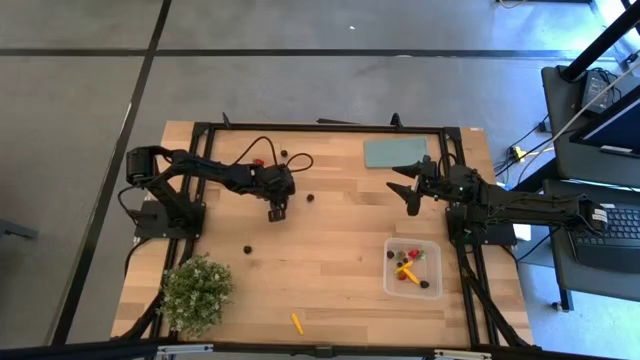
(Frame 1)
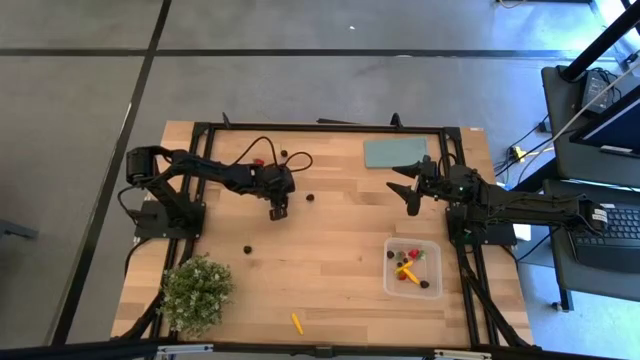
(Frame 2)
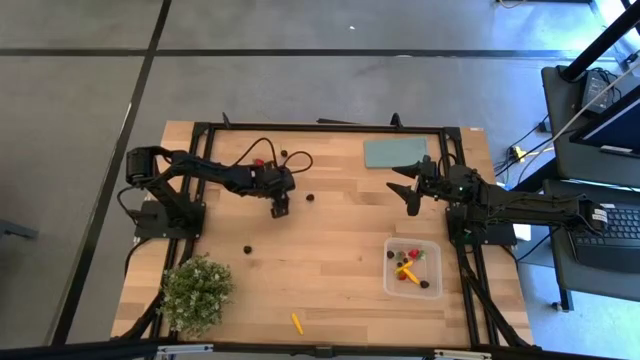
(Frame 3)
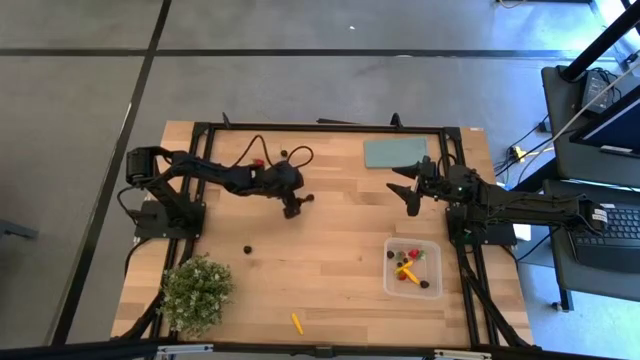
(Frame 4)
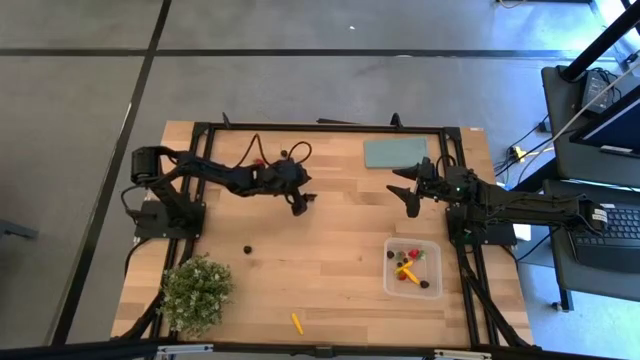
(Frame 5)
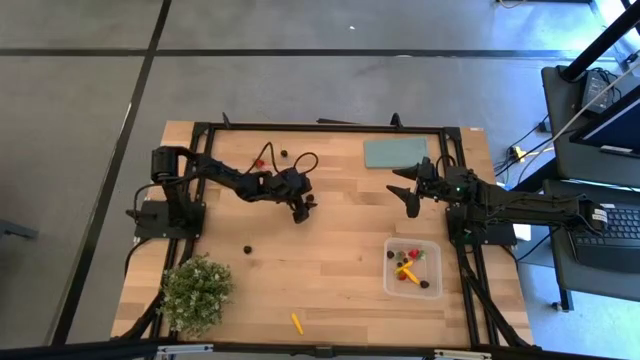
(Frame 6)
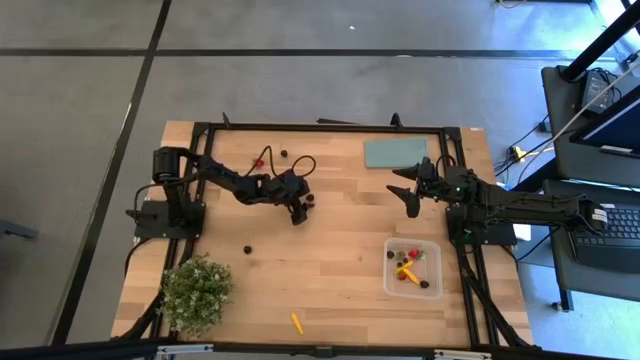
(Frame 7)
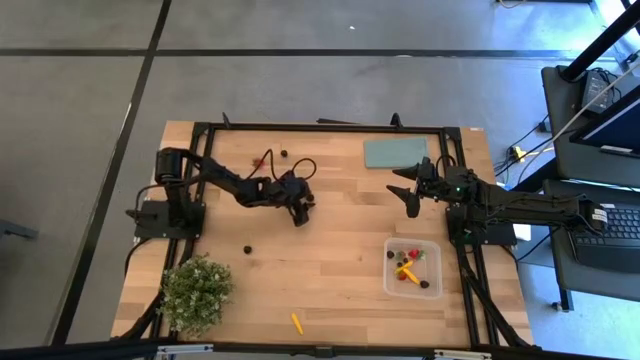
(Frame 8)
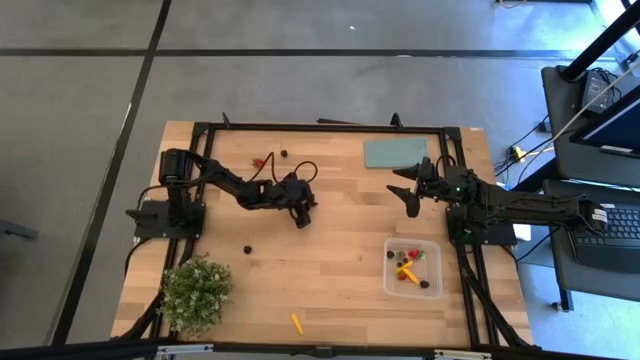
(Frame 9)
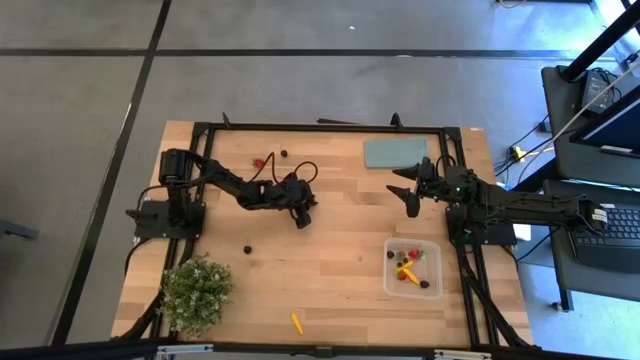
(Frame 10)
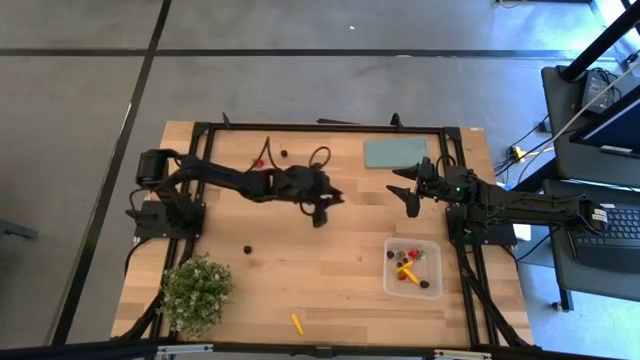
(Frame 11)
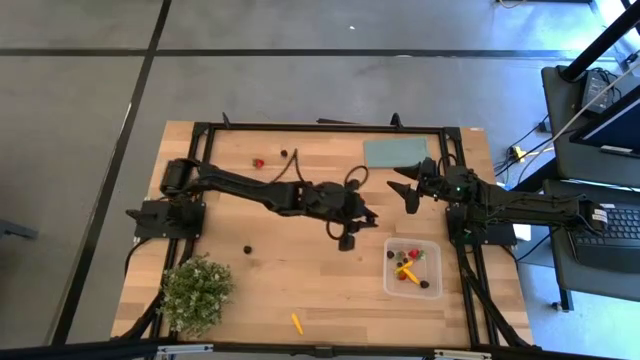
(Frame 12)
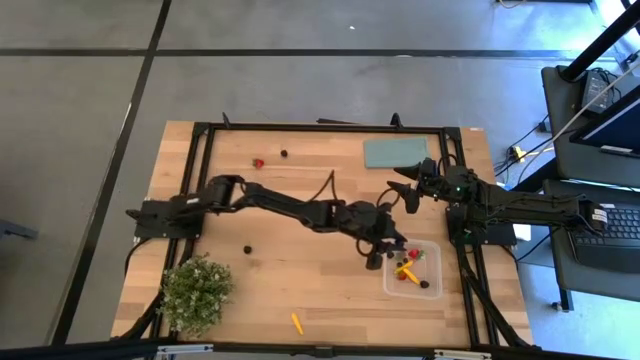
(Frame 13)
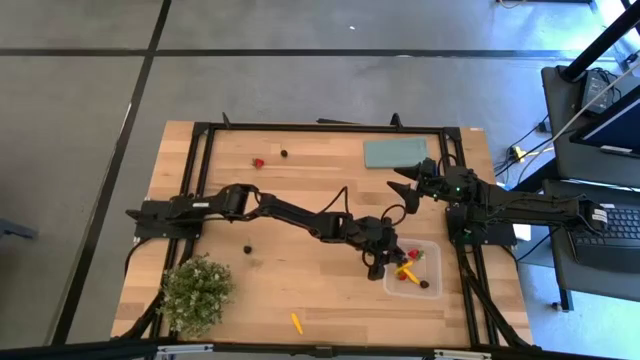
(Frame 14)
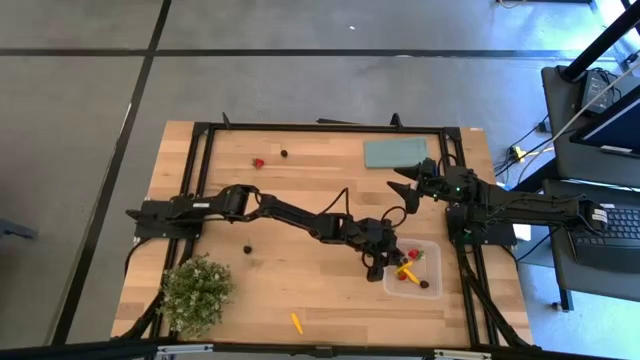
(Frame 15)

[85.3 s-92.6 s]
Task: Pick and placing Produce into tupperware
Put the blackberry into the container

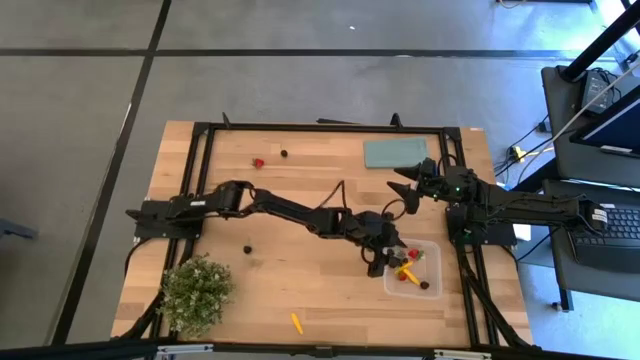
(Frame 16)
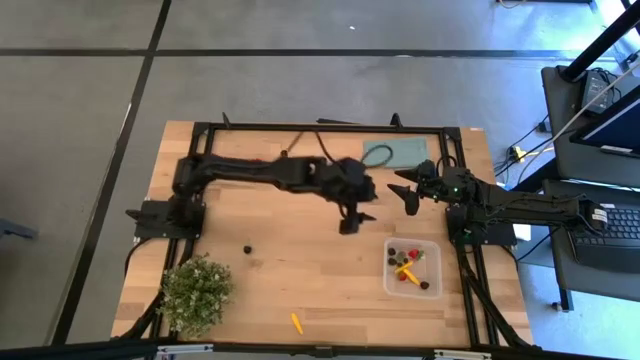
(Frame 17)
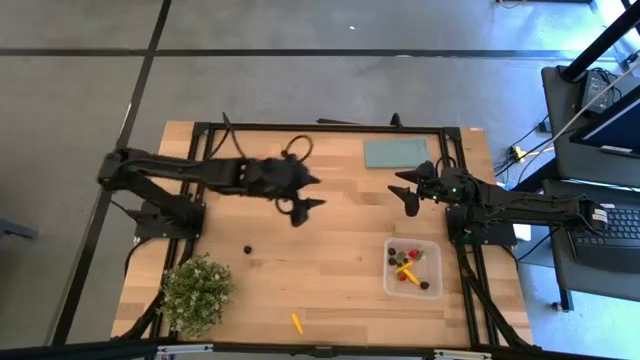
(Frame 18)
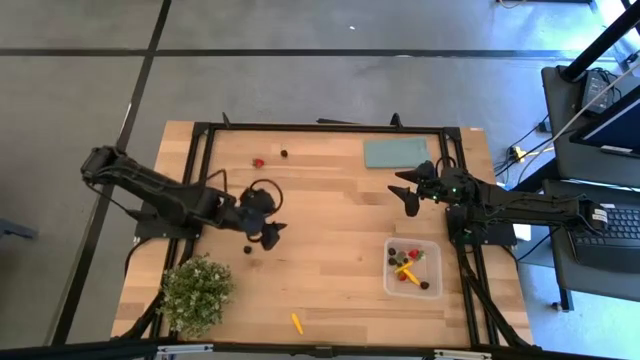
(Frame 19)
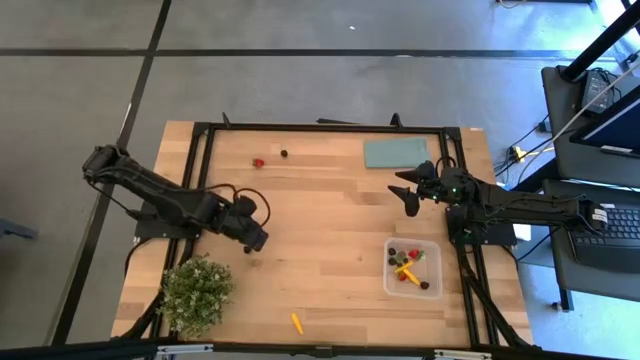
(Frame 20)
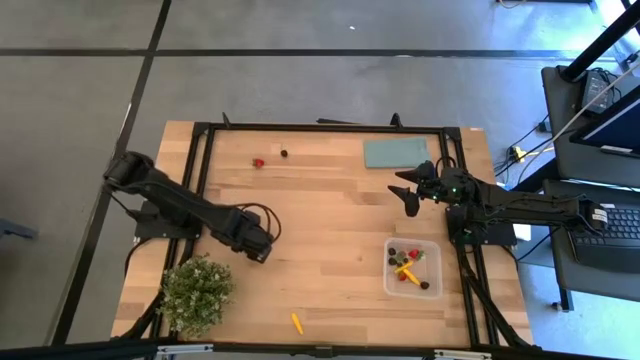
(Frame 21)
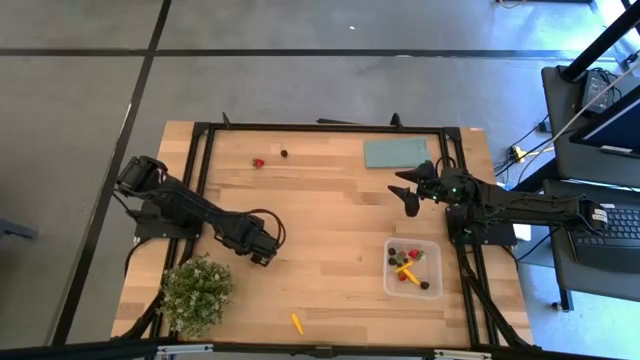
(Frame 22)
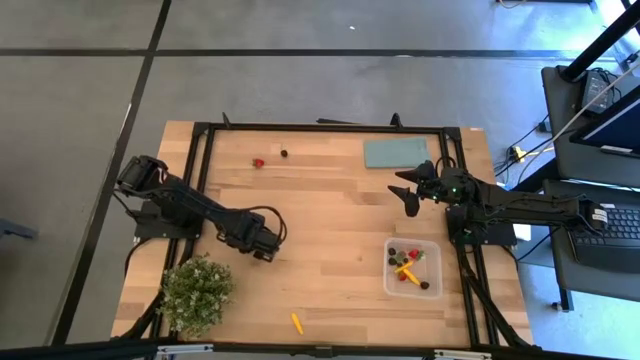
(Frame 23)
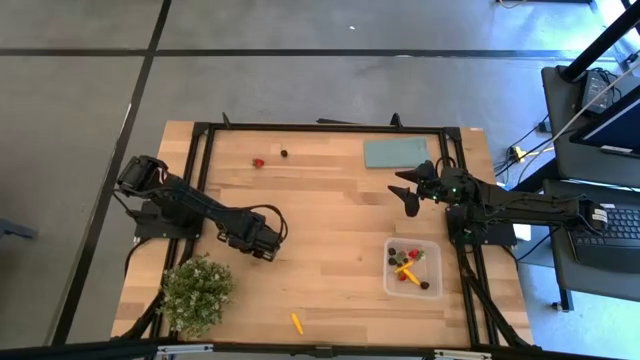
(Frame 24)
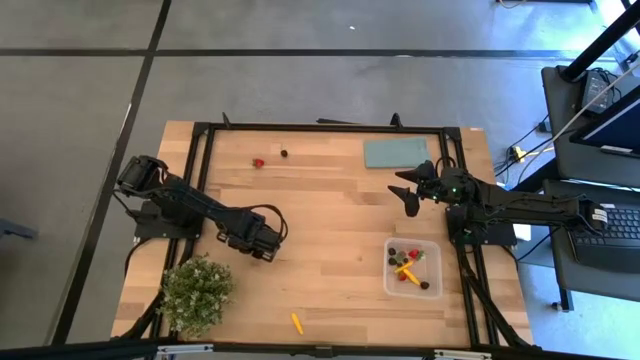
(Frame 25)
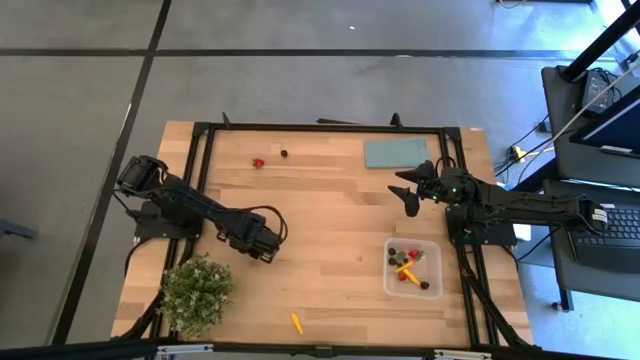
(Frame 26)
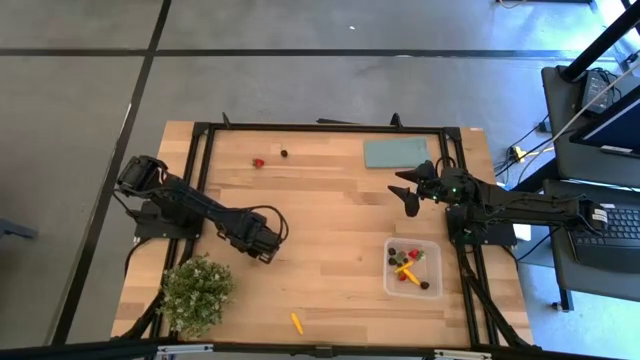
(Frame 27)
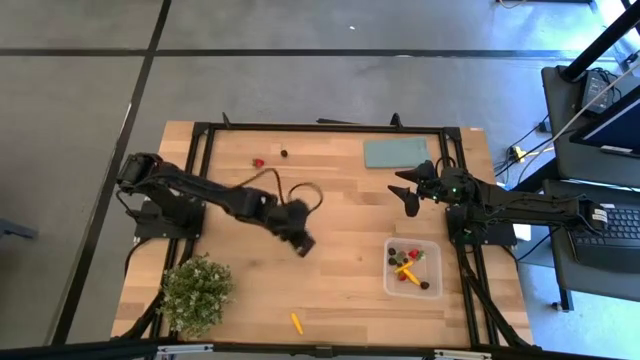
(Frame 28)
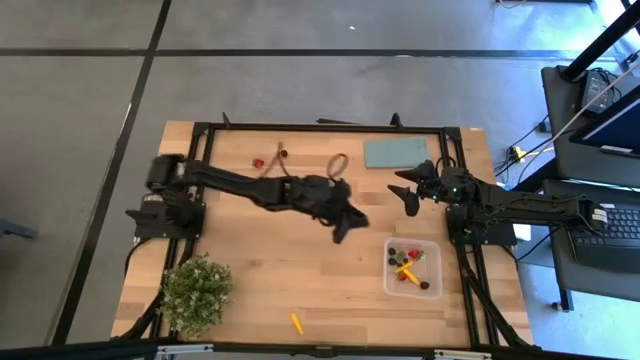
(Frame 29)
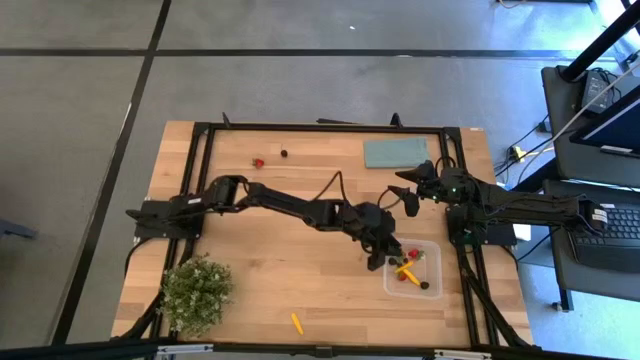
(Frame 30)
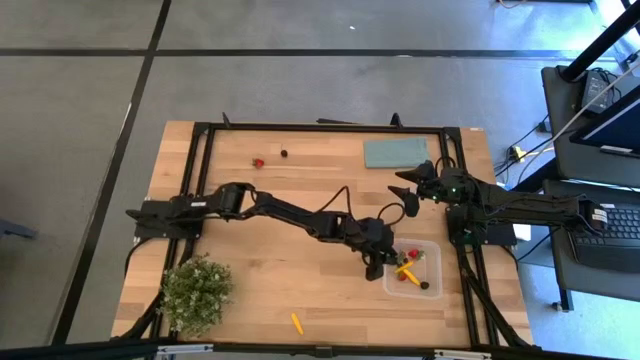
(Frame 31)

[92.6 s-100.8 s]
Put the bottom black cherry into the container

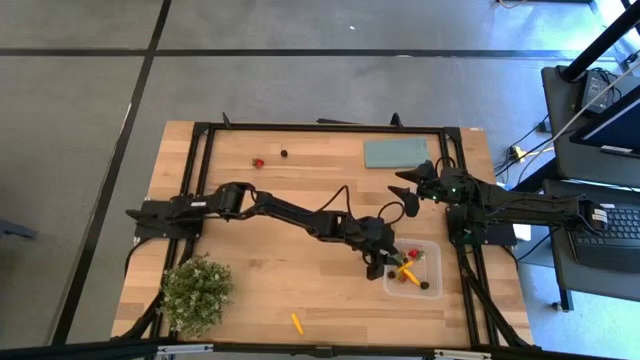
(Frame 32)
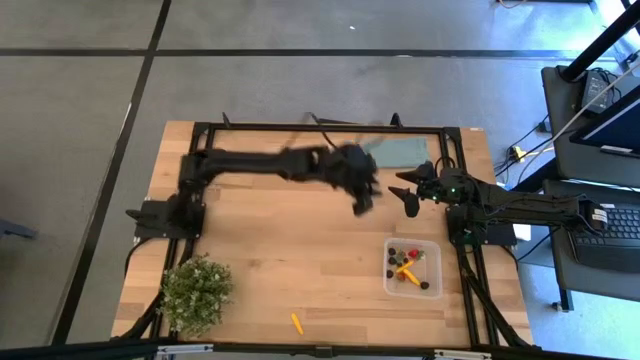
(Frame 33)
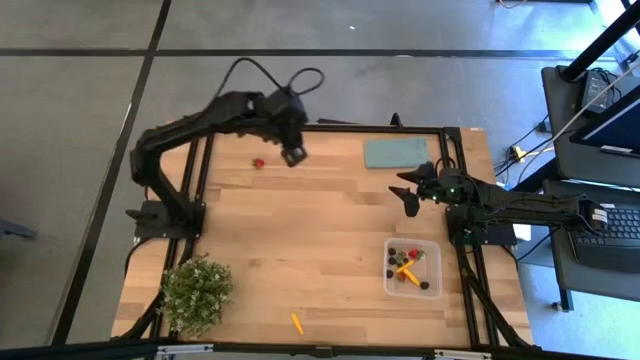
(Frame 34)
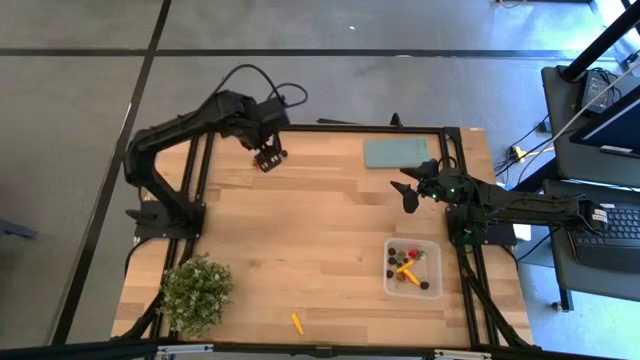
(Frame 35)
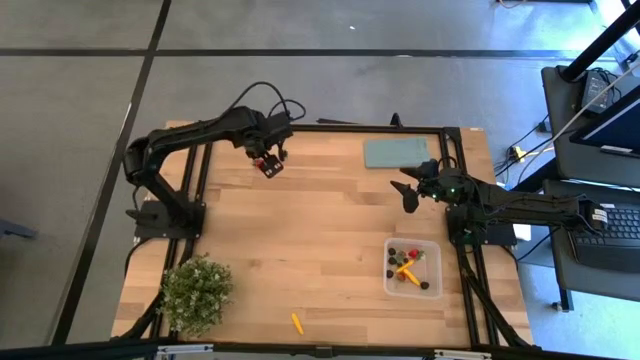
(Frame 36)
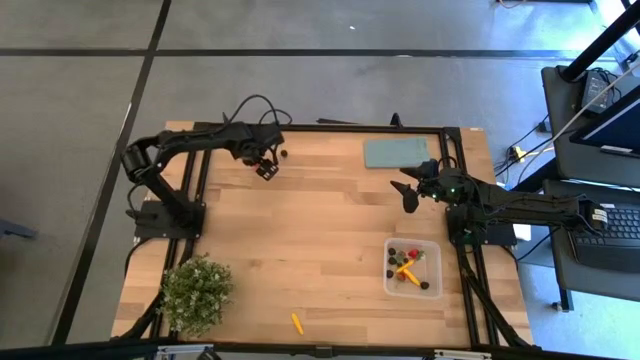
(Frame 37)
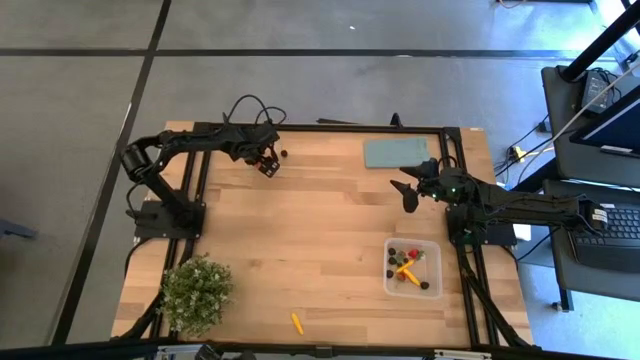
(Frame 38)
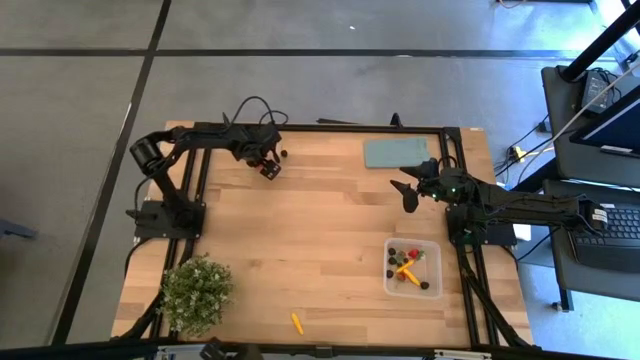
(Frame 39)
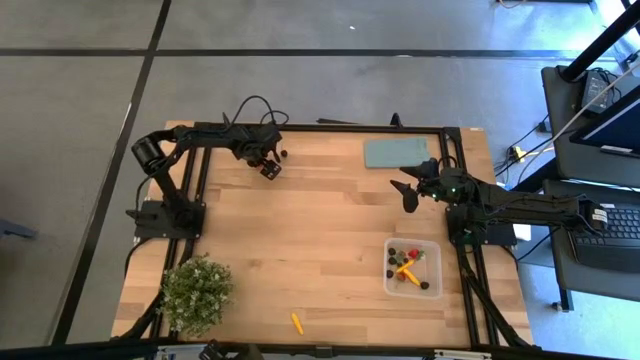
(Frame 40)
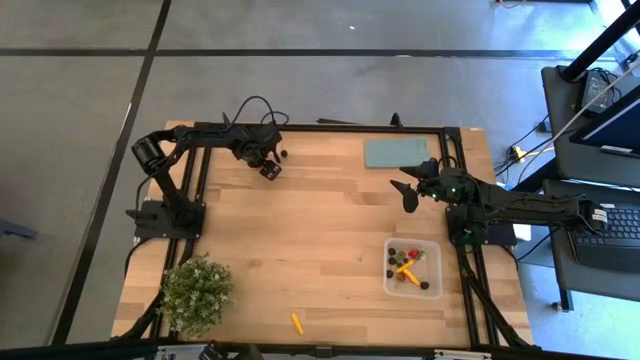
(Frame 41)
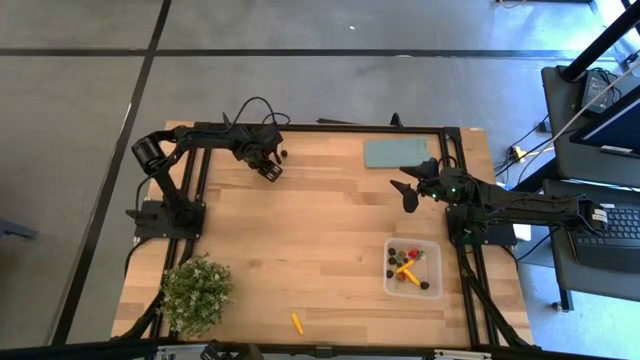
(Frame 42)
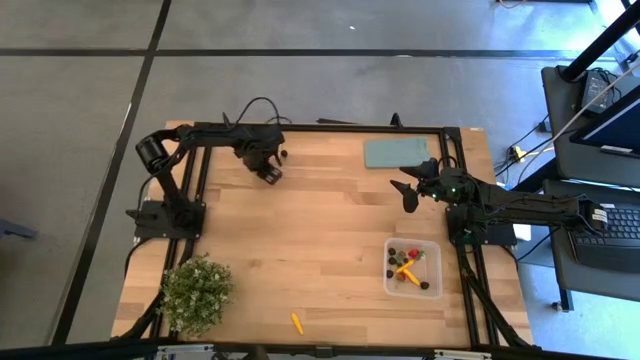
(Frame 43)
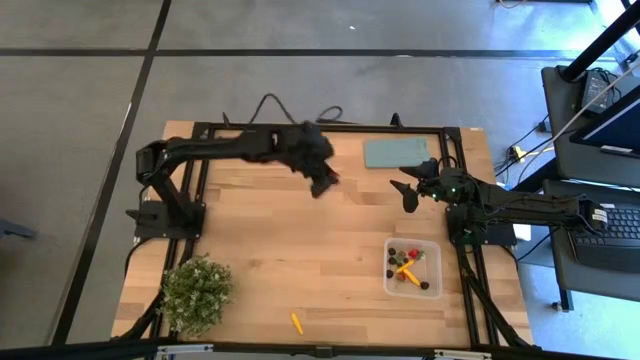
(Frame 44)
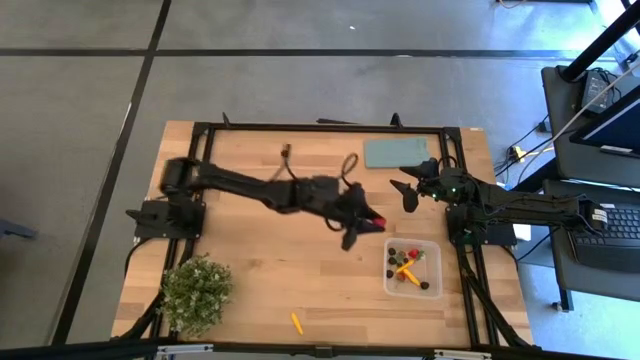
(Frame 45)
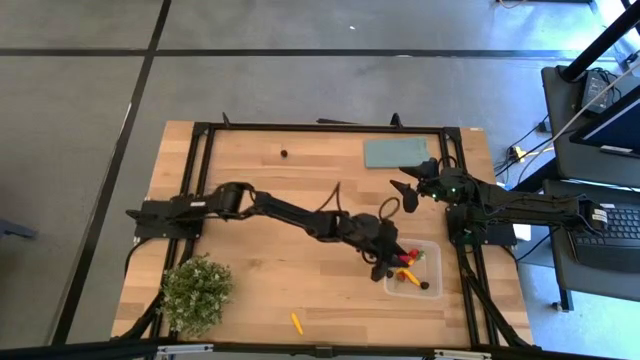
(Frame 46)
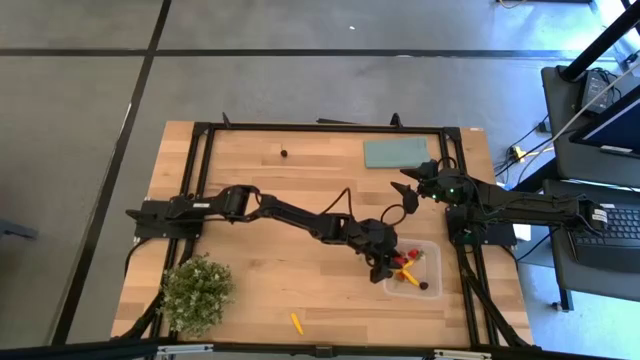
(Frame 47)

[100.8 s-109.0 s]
Put the strawberry into the container
